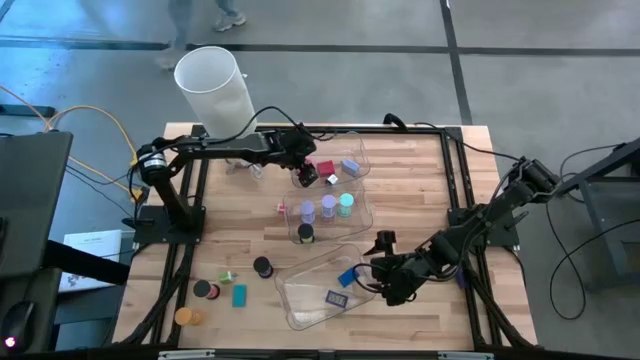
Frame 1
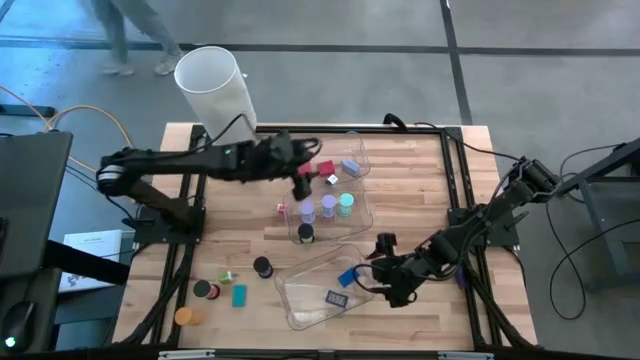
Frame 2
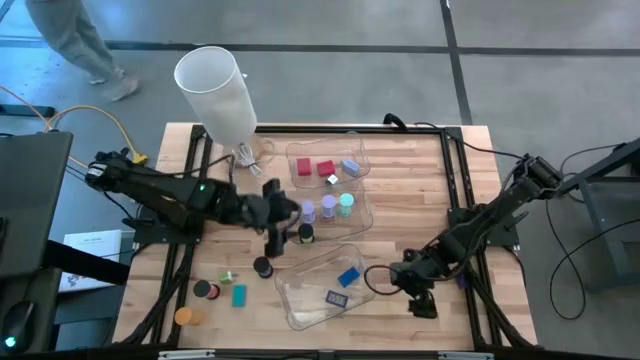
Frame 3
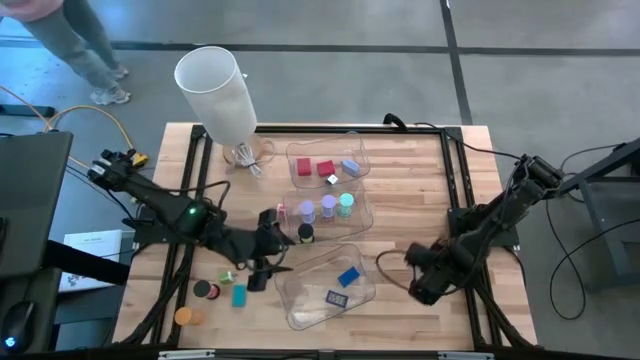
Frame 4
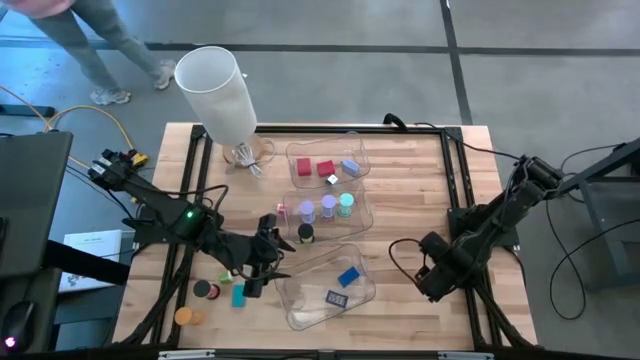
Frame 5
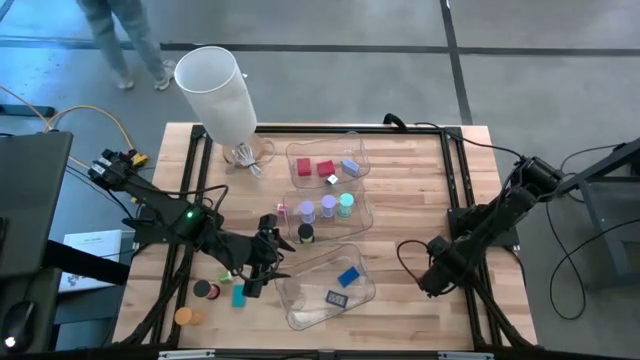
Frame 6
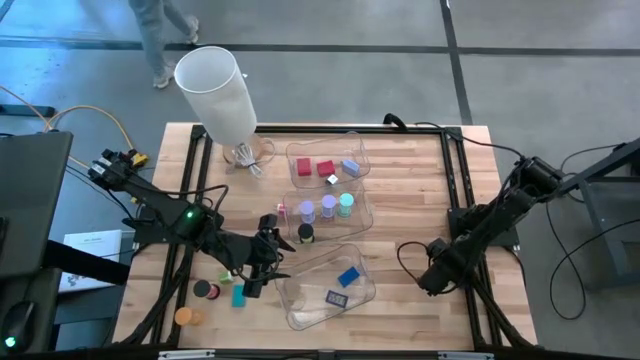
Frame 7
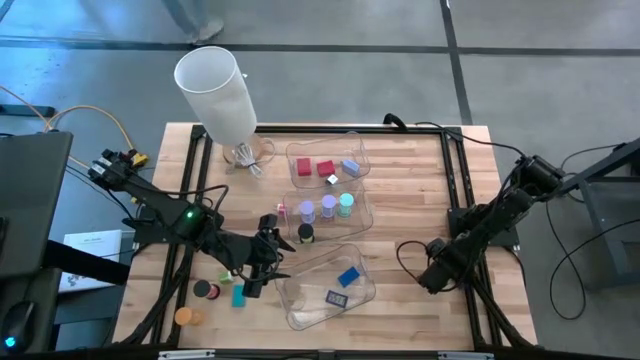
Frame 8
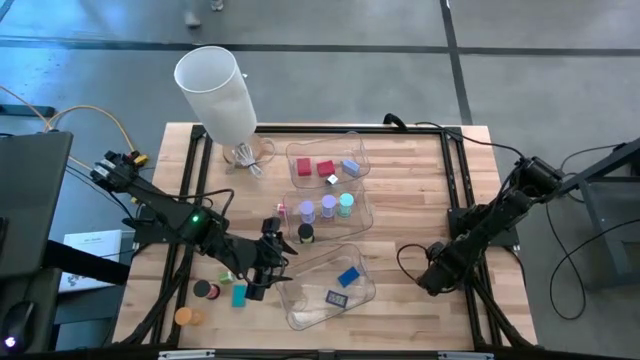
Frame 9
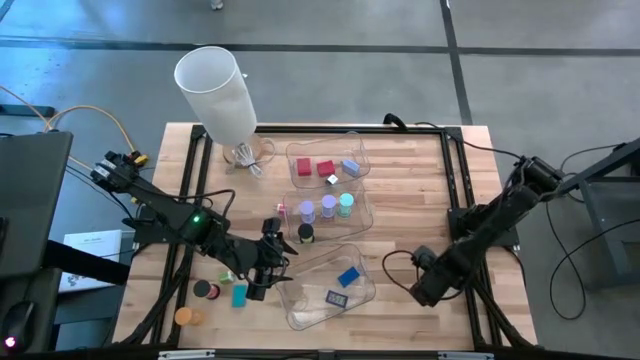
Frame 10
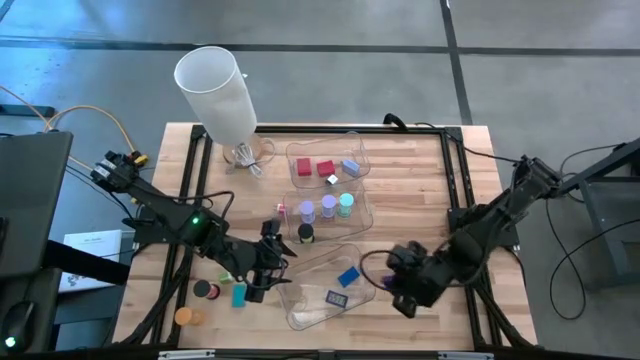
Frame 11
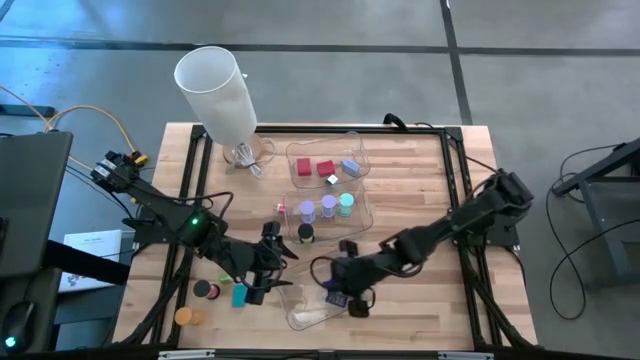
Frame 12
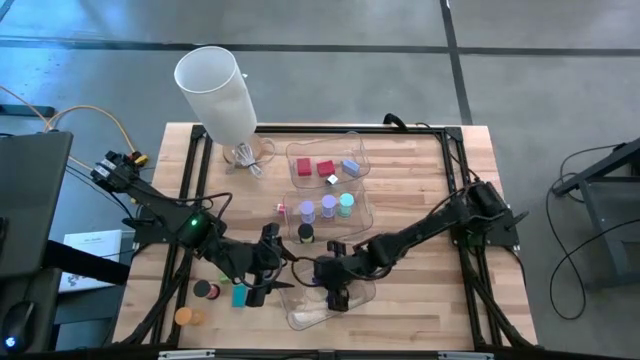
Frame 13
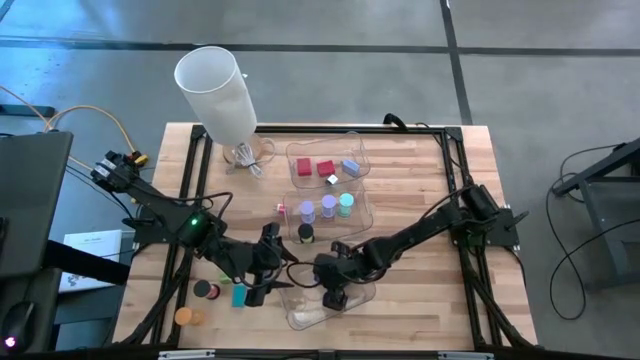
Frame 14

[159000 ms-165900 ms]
Task: Pick & Place Office items
Put the dark blue digital clock into the bottom transparent bin

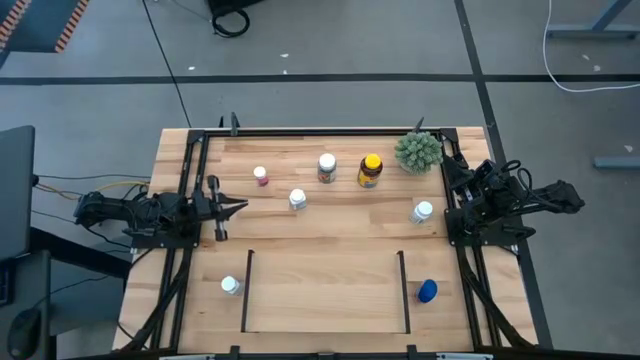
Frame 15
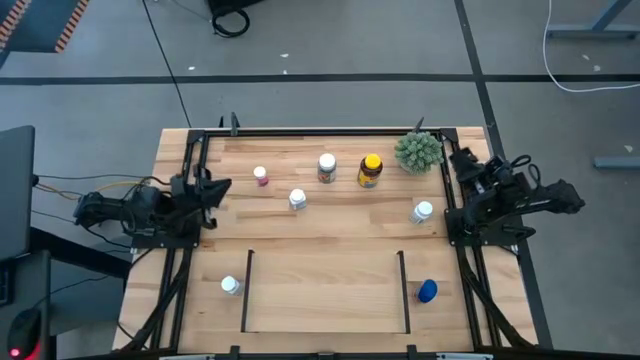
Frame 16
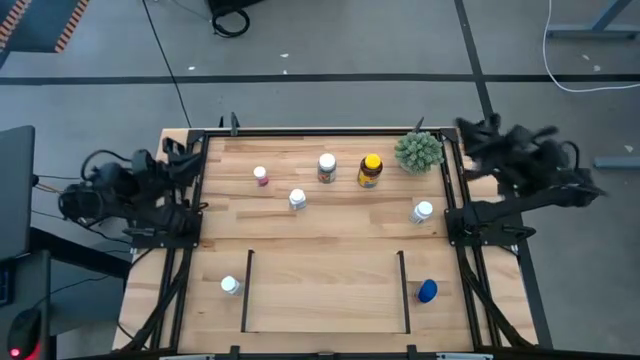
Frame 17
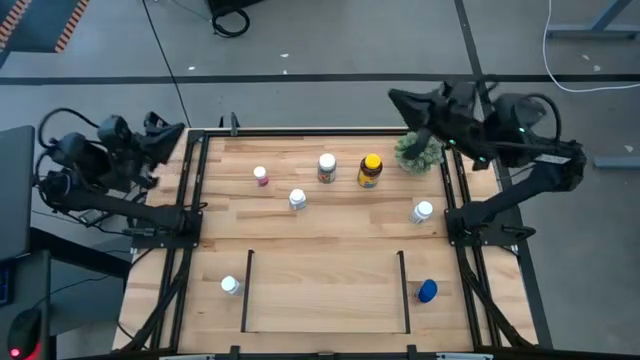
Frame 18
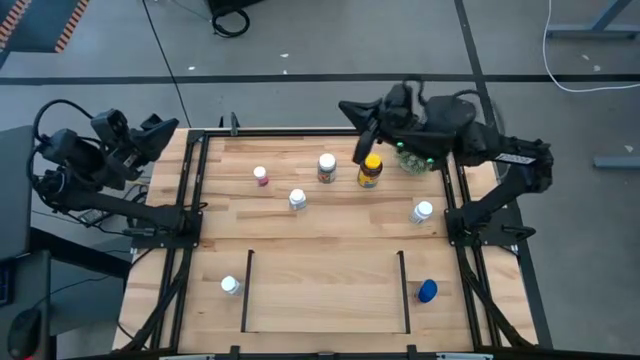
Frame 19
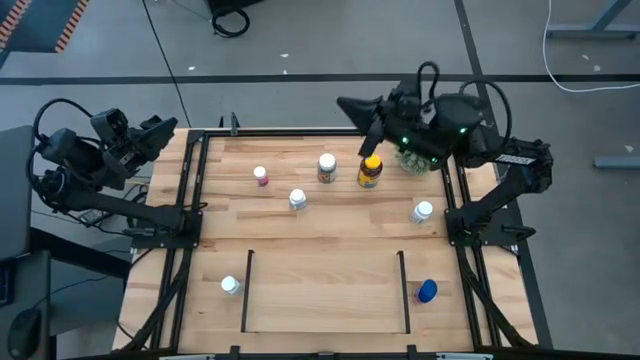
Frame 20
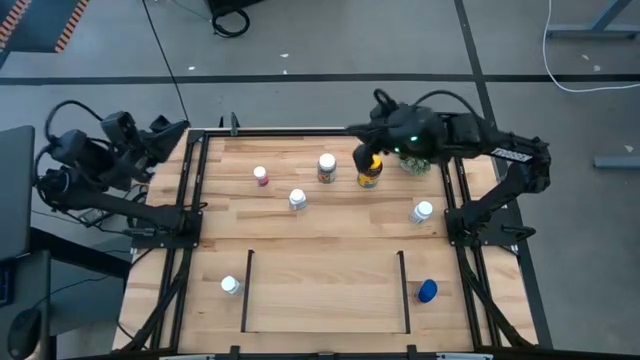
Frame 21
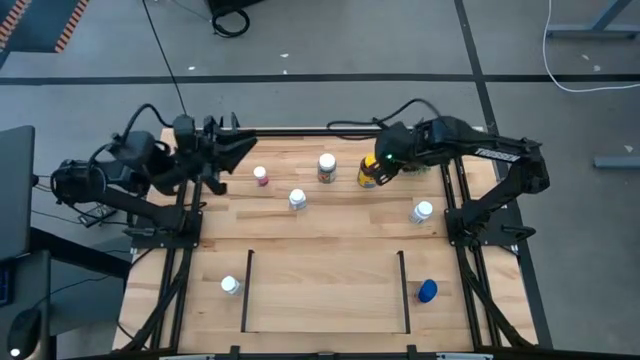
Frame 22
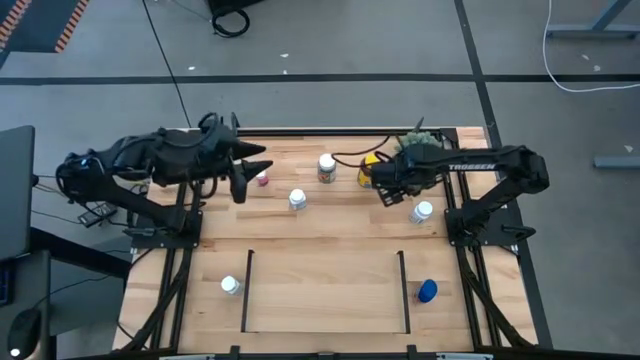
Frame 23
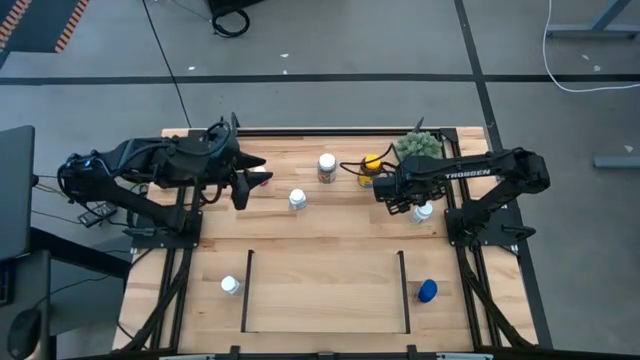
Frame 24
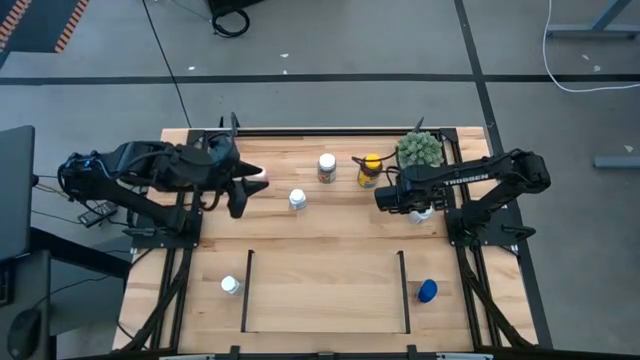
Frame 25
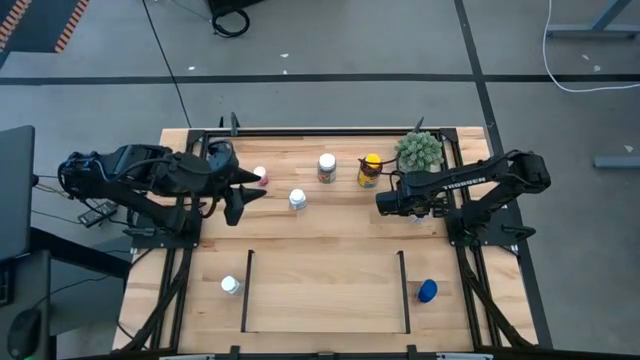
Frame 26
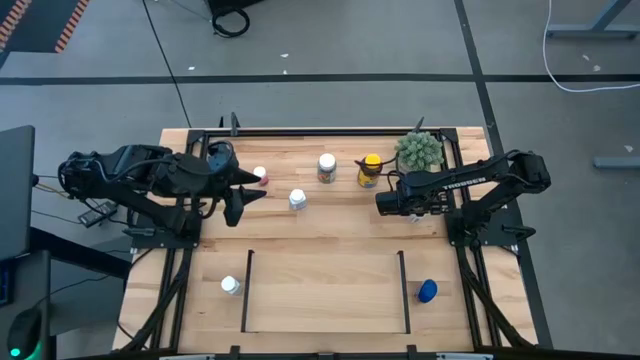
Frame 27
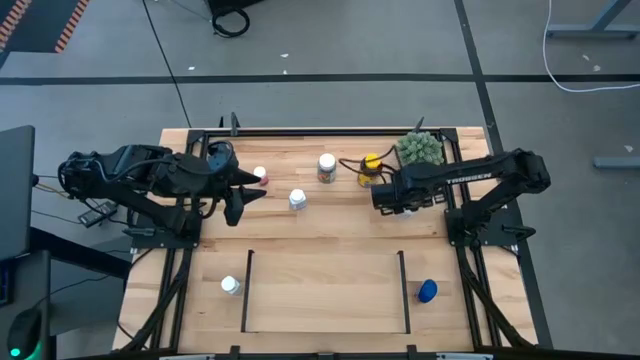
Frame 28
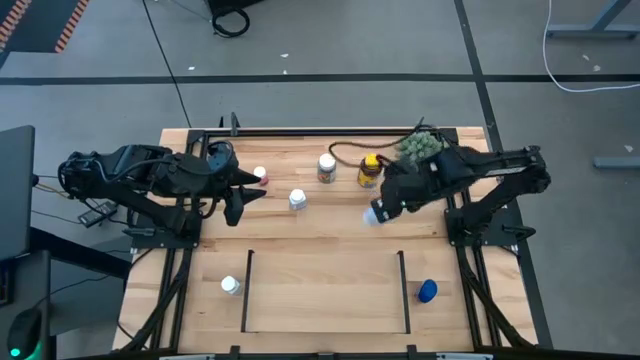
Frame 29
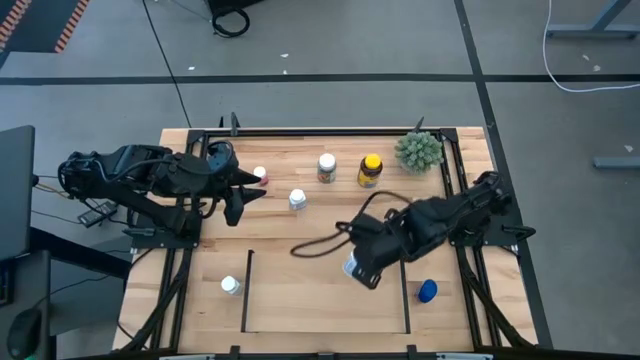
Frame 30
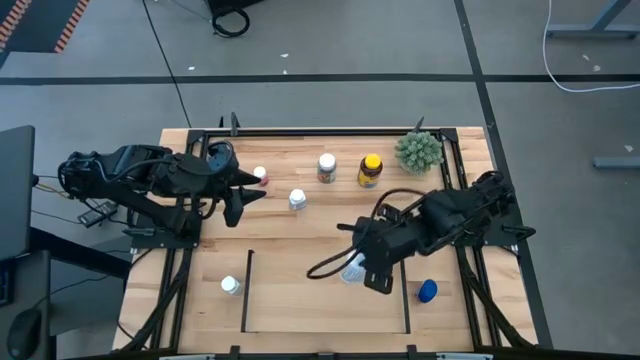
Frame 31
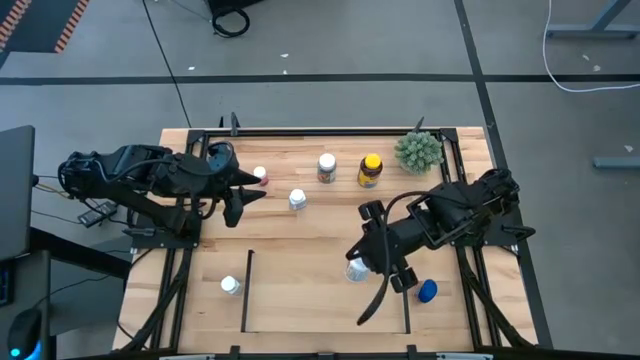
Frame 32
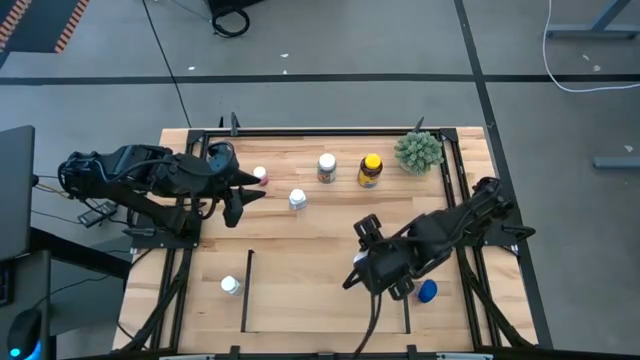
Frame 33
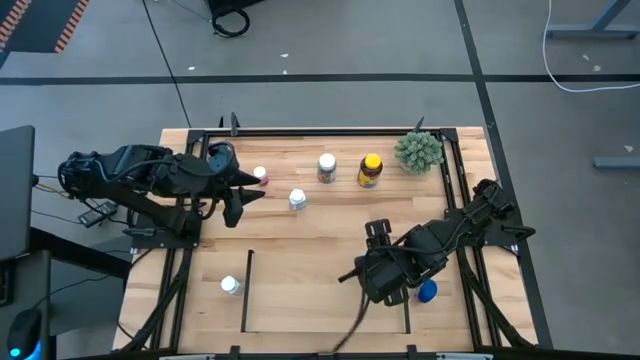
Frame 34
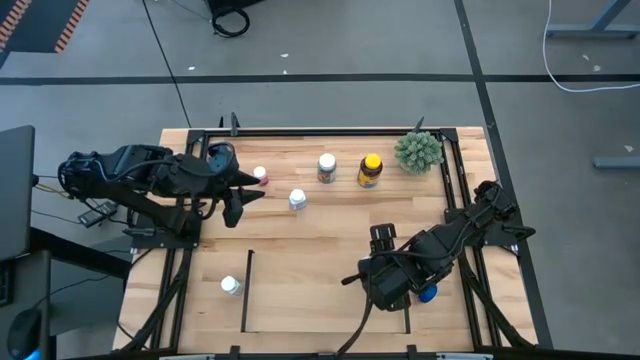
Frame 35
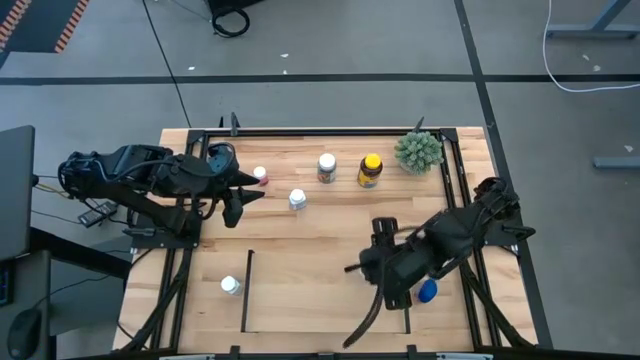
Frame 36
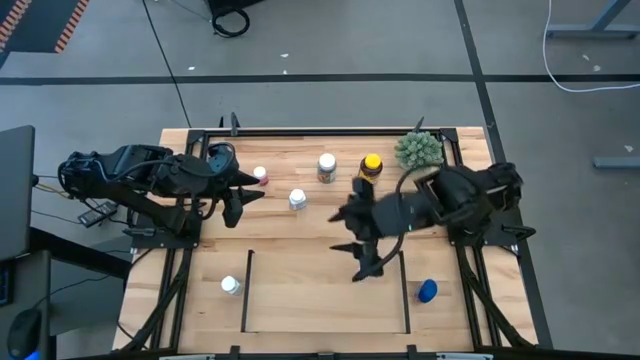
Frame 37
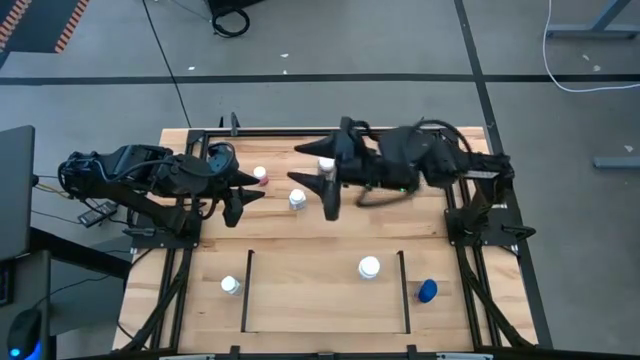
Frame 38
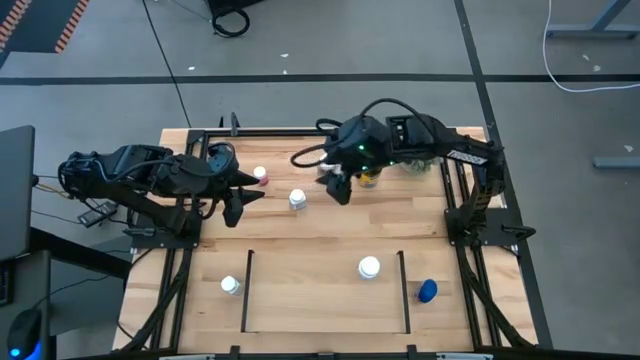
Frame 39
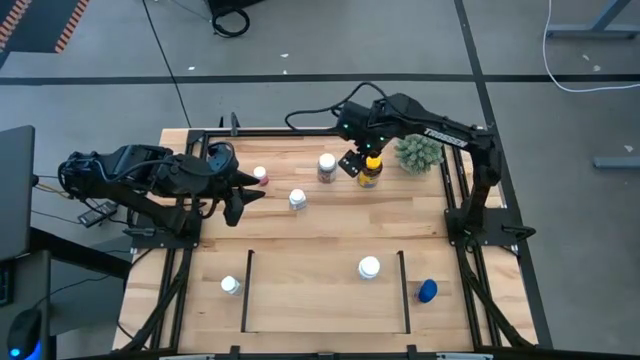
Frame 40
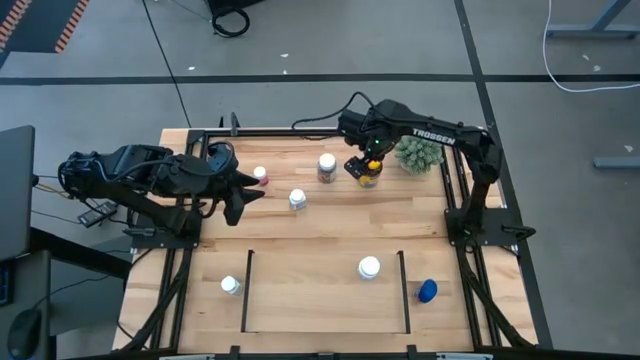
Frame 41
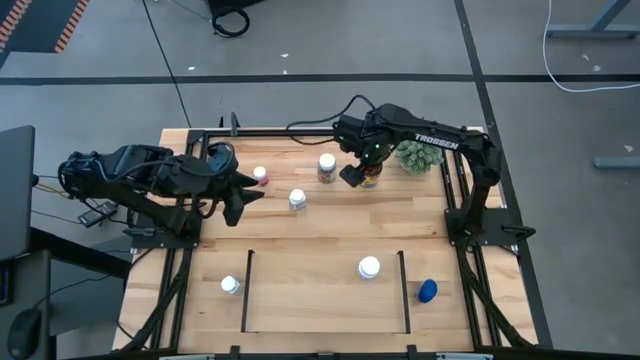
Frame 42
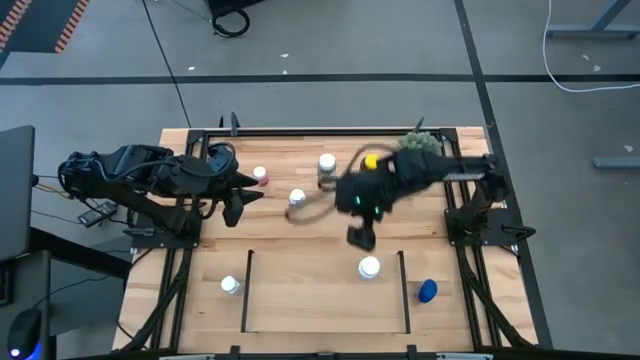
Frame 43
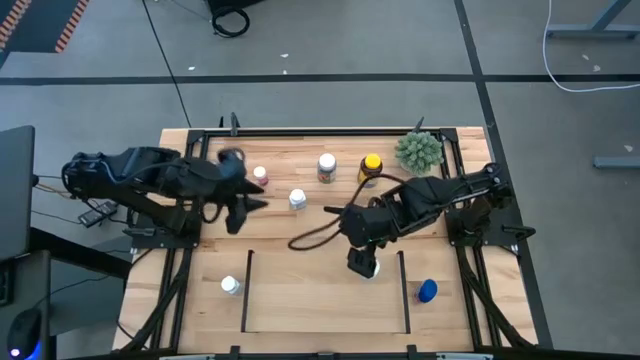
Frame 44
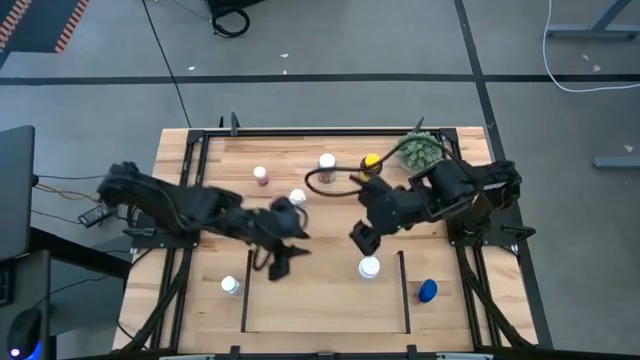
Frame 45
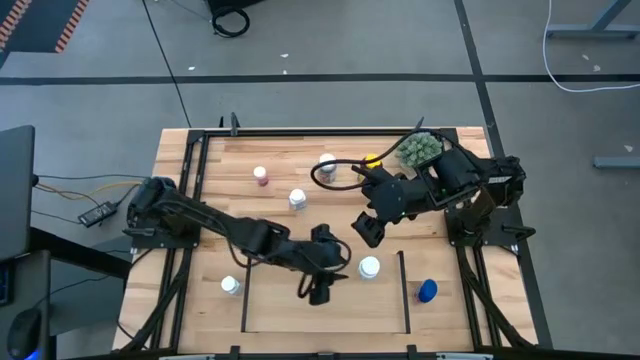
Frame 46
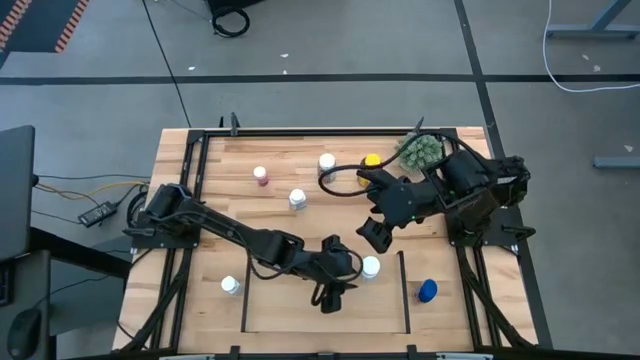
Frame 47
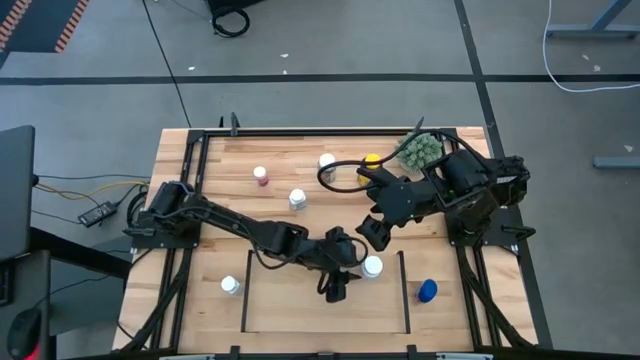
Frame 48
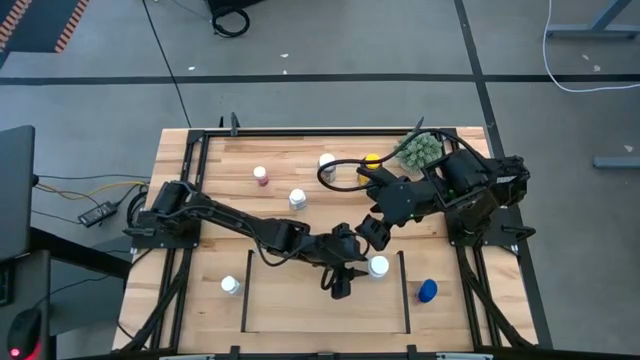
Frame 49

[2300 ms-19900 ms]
Task: Pick and place medicine bottles onto shelf by color
Put the white and yellow medicine bottle on the shelf
